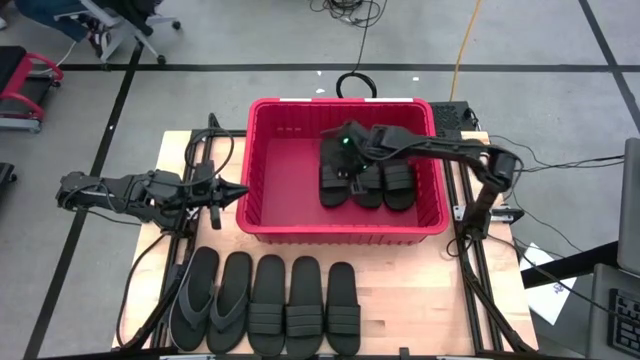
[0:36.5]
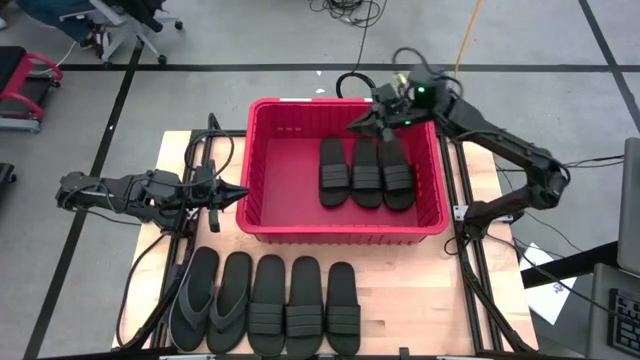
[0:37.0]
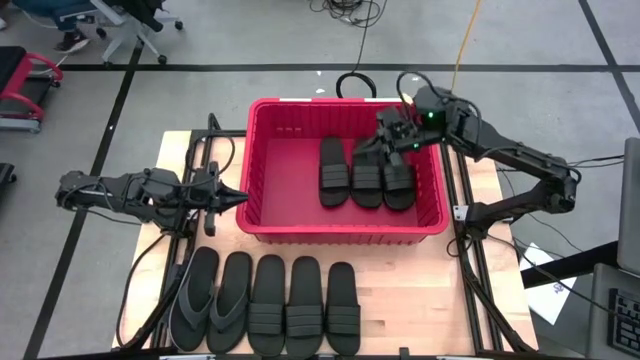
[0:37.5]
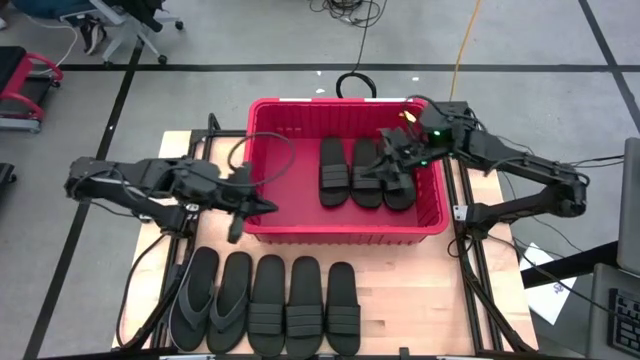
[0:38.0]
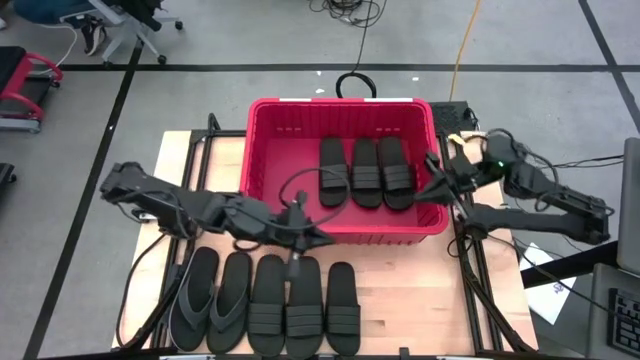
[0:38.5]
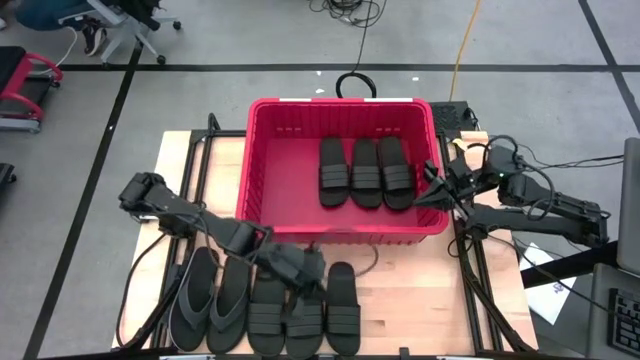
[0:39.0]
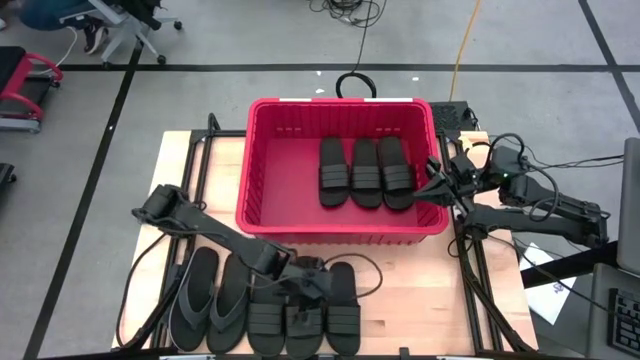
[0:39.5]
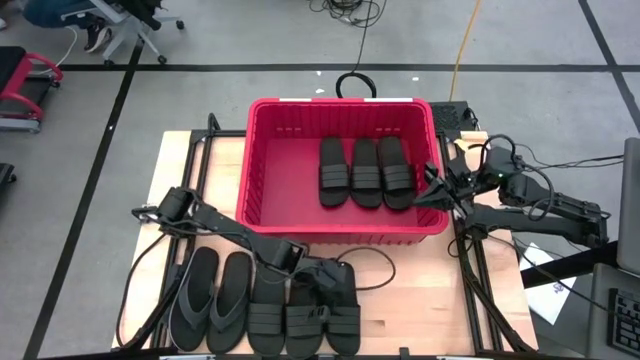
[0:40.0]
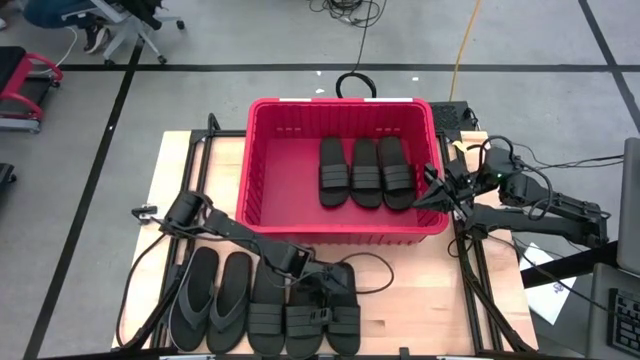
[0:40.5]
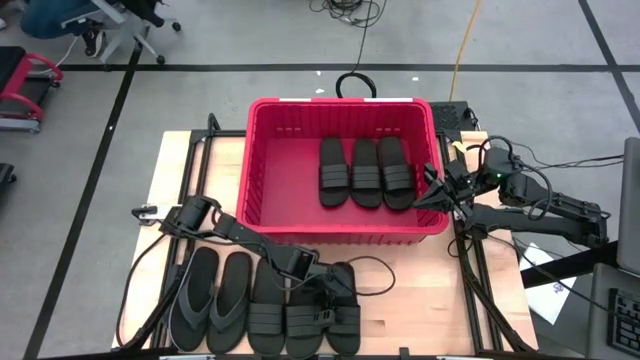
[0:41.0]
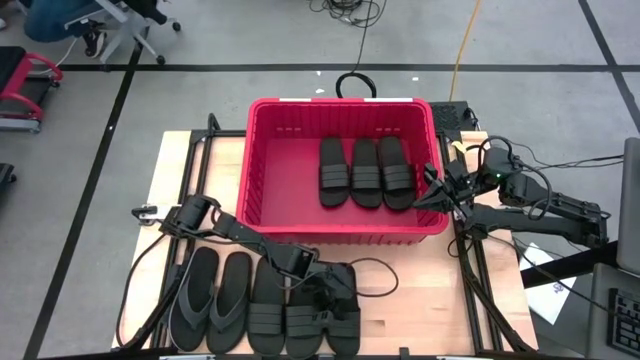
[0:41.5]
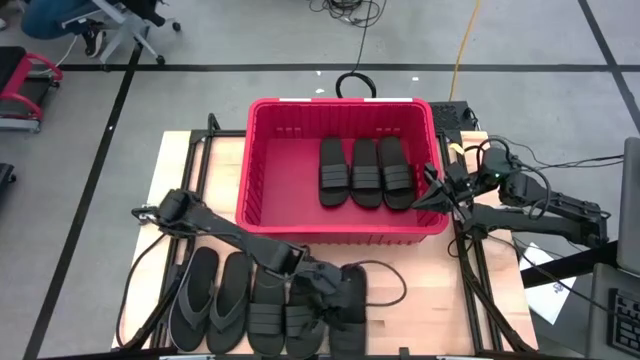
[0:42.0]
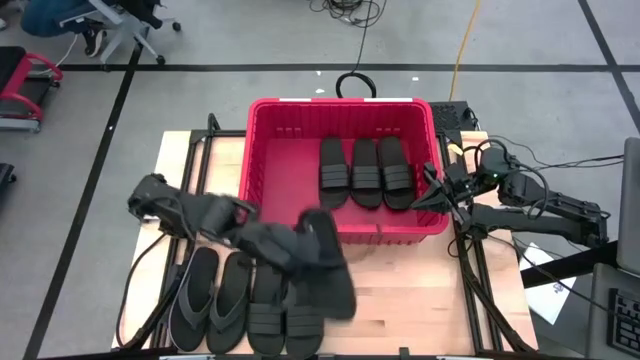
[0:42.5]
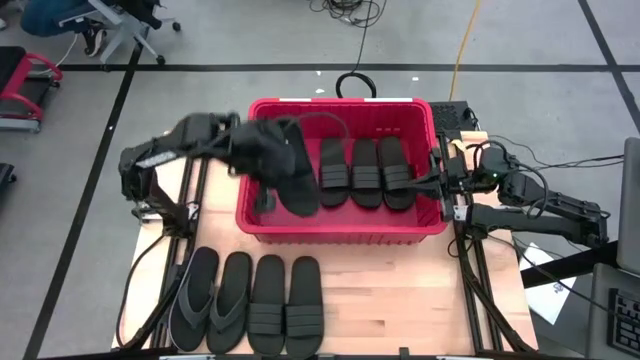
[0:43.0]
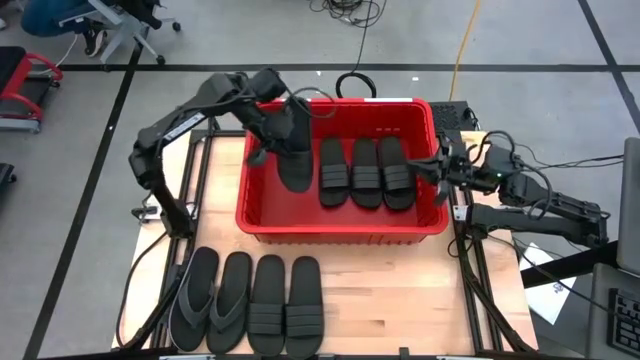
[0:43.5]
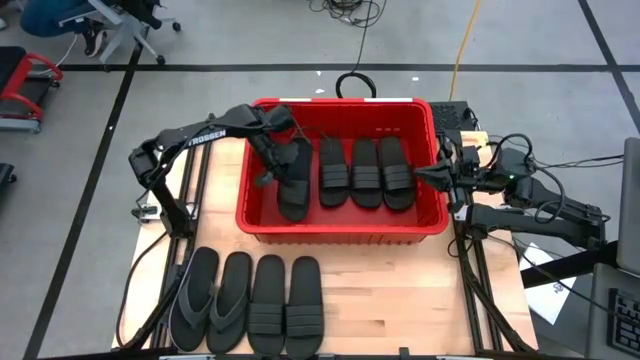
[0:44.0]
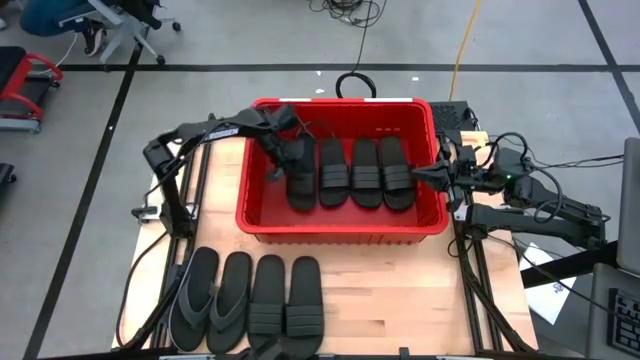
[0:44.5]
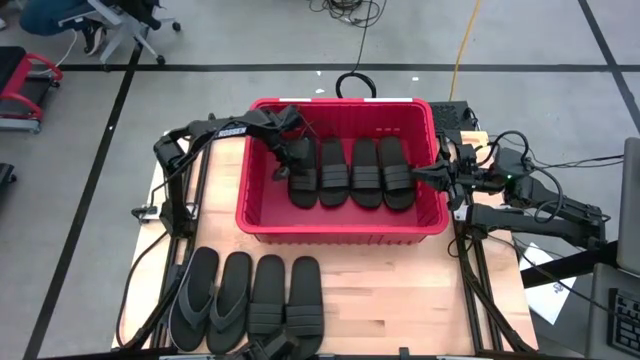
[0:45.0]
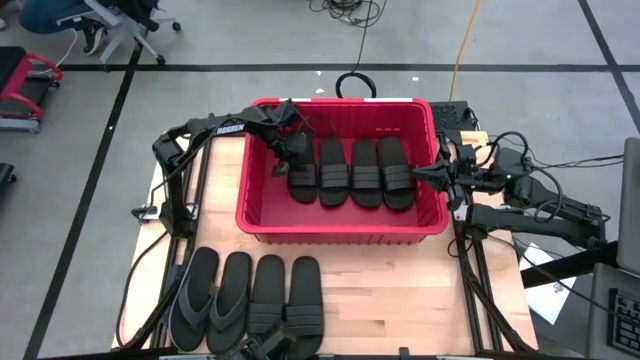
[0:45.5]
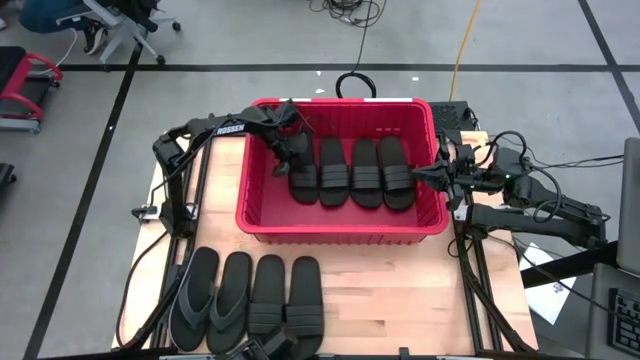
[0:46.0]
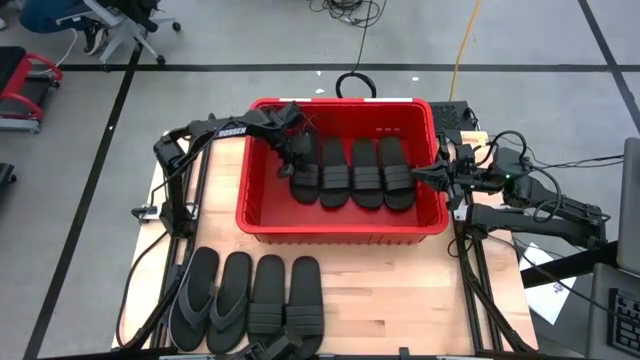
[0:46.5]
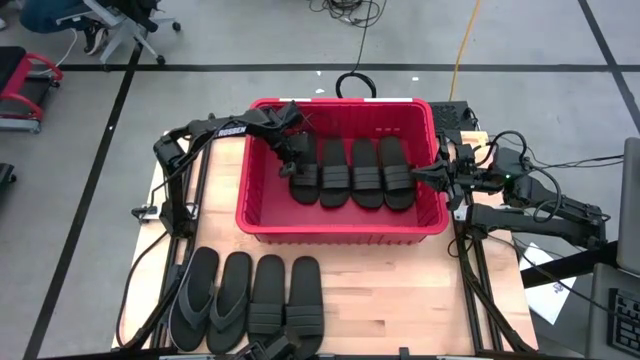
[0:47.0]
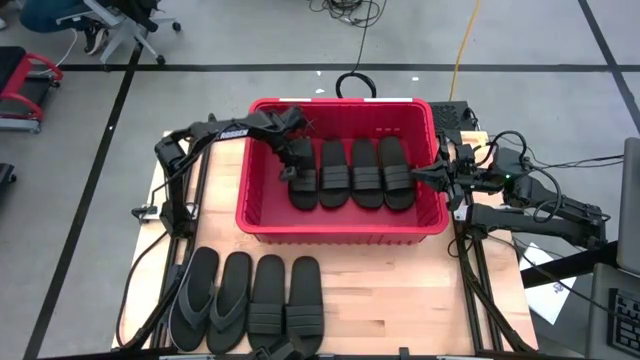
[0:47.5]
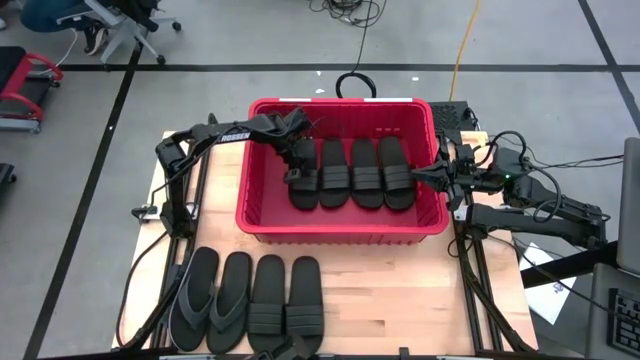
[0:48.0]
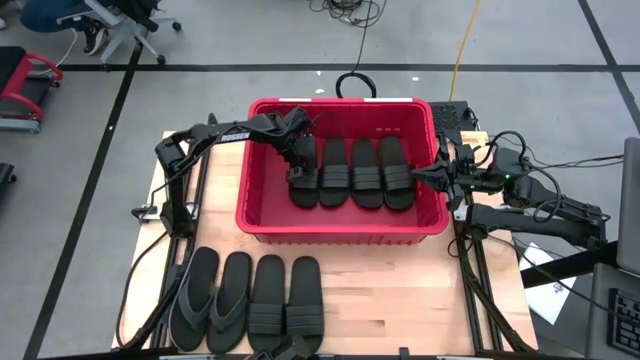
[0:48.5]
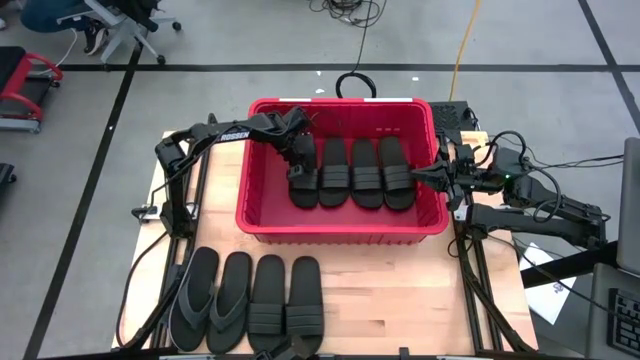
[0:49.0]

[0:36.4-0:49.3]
Task: Pick and place slides into bin
Put the black slipper into the red bin

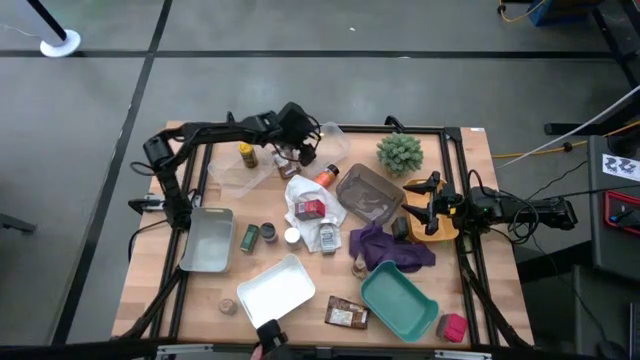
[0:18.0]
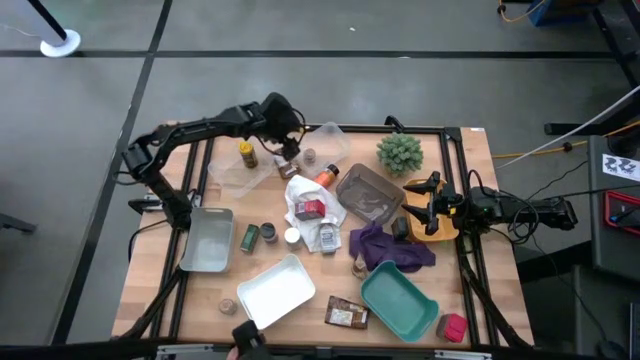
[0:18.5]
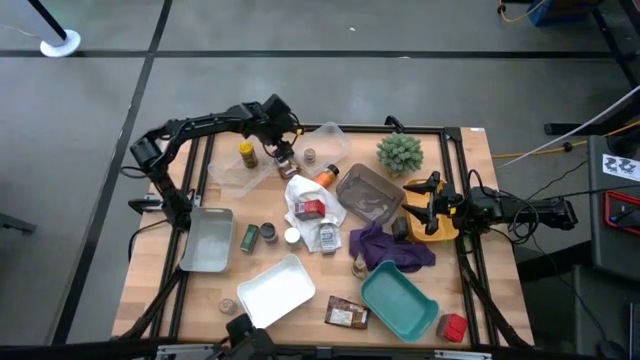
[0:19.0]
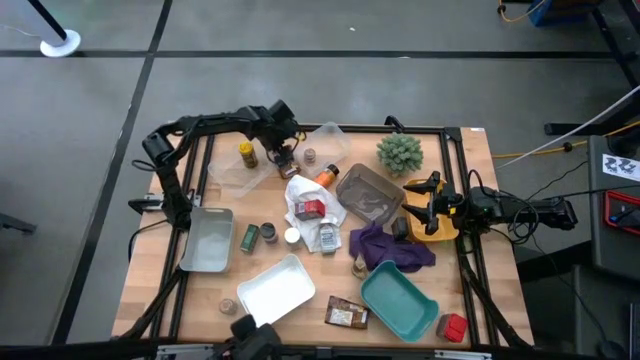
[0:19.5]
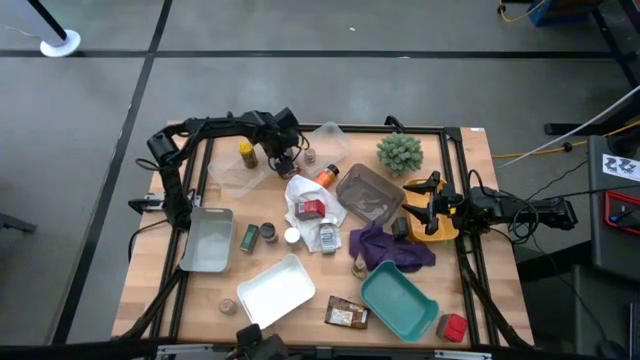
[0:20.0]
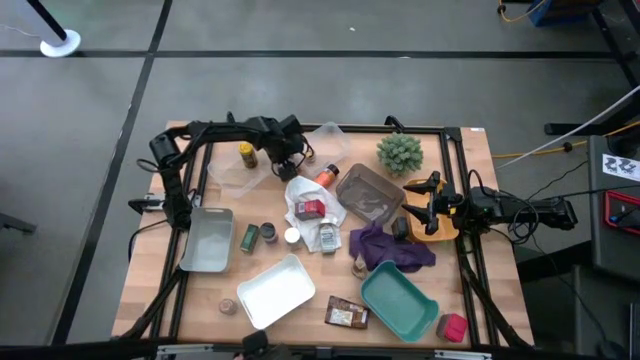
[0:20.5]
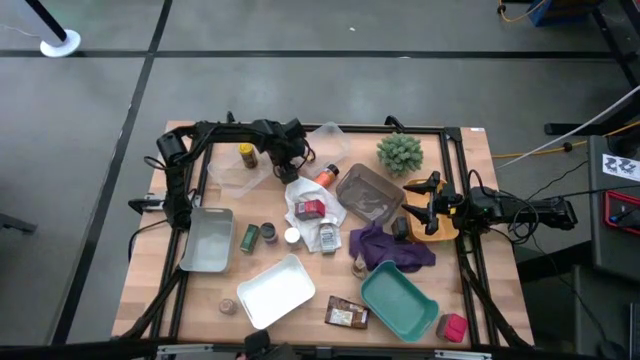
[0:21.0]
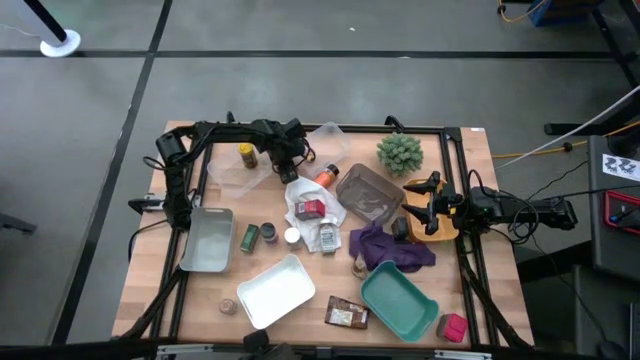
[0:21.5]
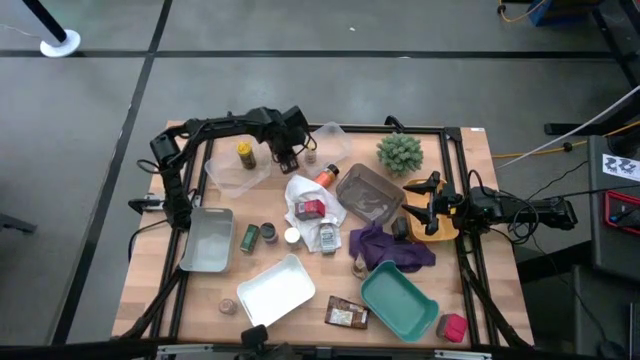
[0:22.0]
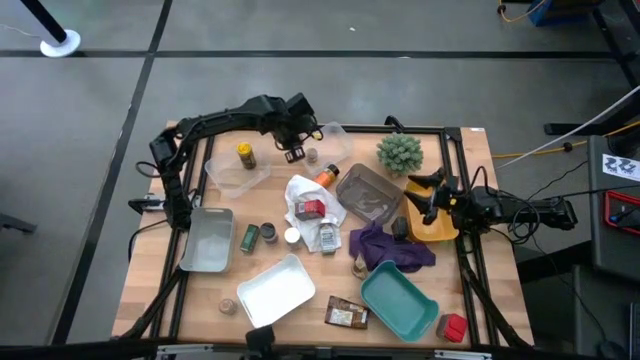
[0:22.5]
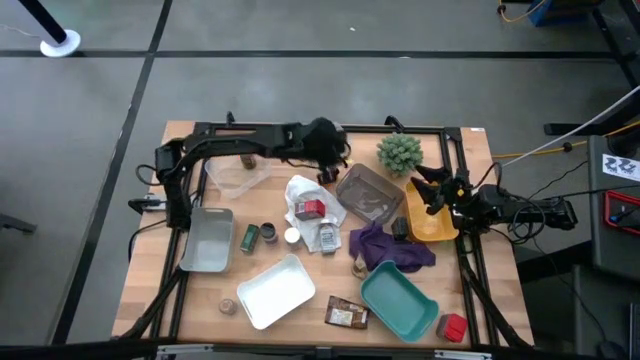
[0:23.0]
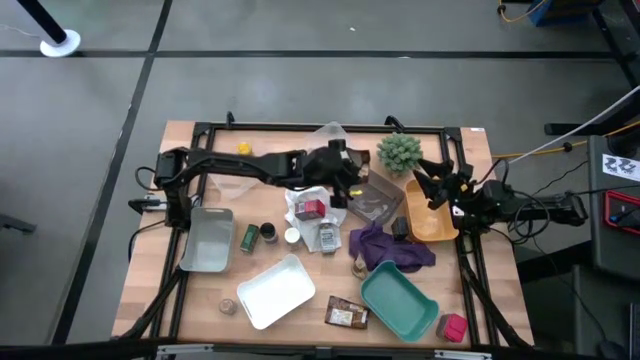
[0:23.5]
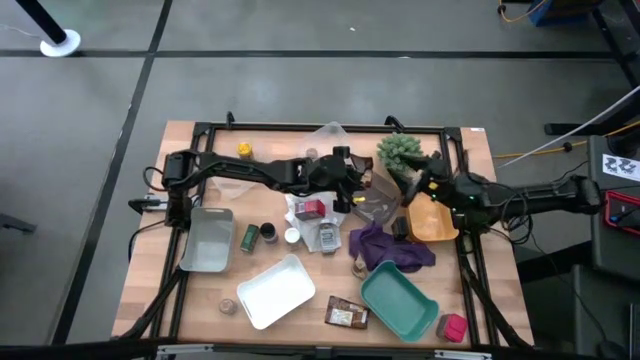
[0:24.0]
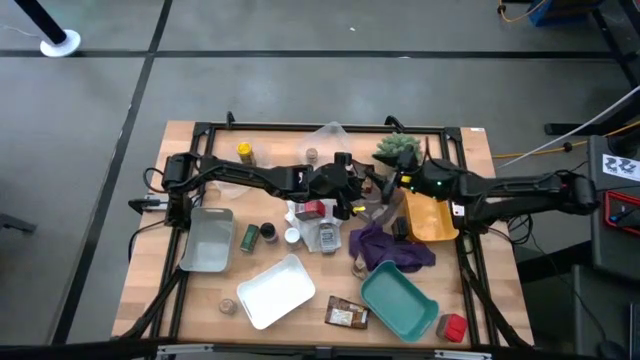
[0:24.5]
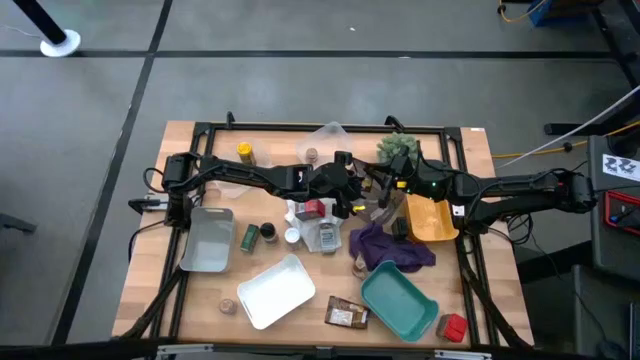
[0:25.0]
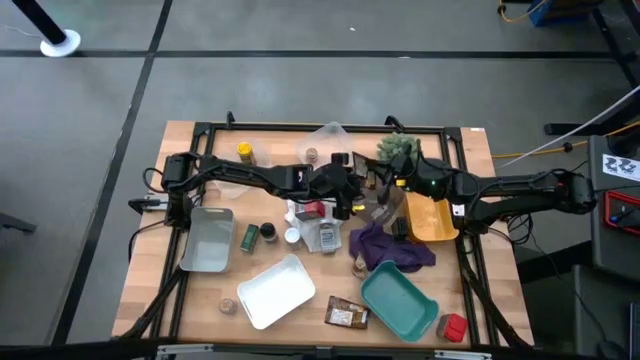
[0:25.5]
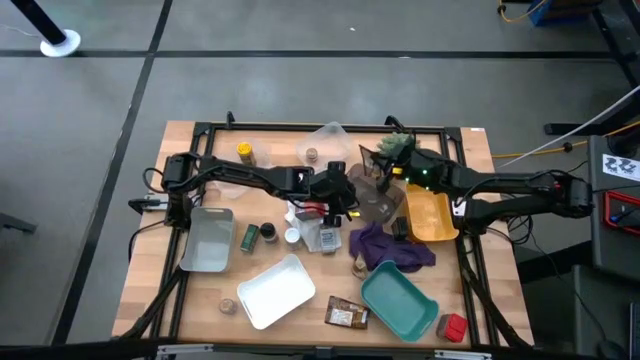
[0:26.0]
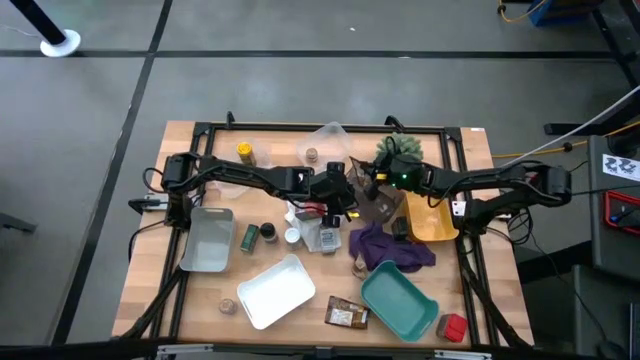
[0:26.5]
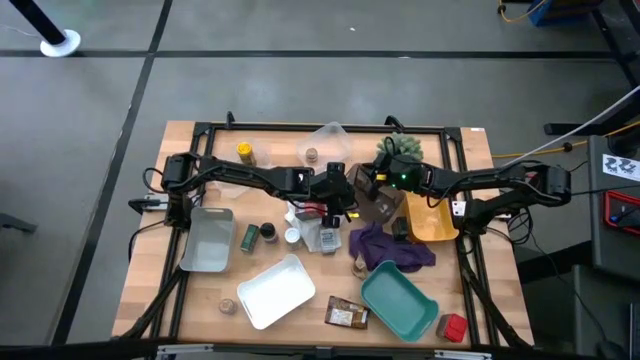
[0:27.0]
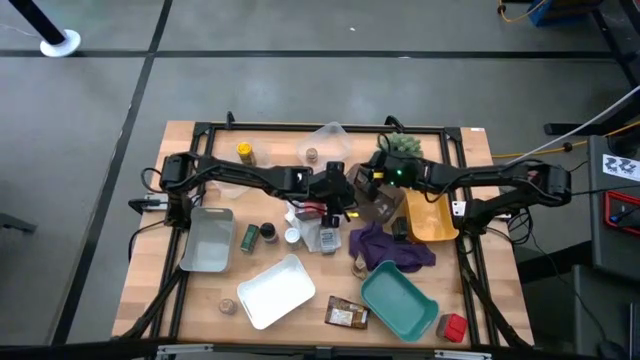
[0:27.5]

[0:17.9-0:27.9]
Task: Sort spices by type
Put the top orange spice pack into the black bin
